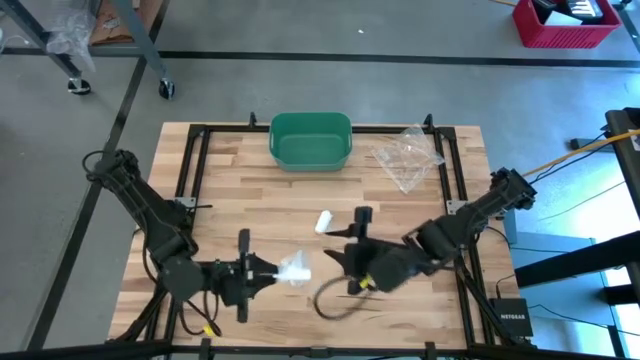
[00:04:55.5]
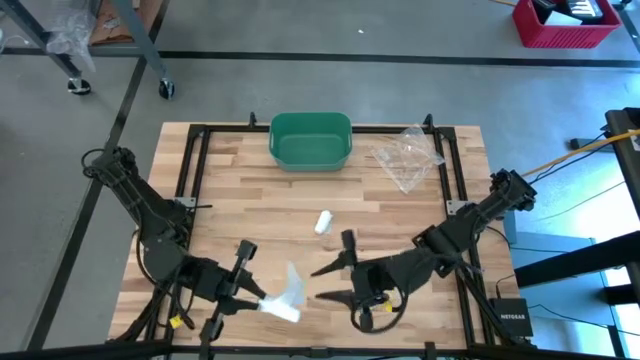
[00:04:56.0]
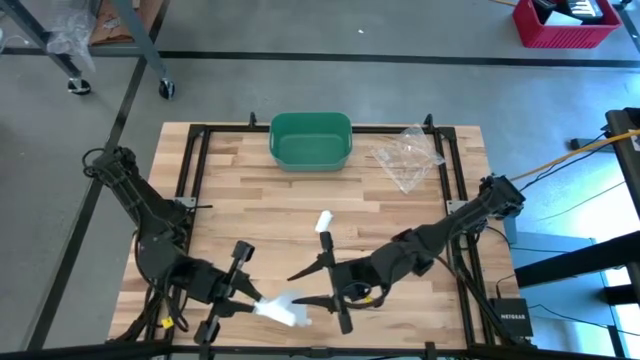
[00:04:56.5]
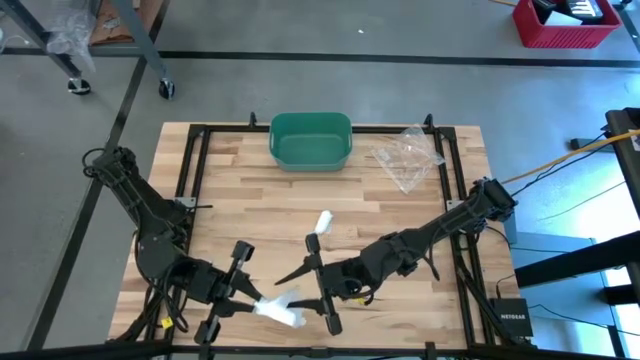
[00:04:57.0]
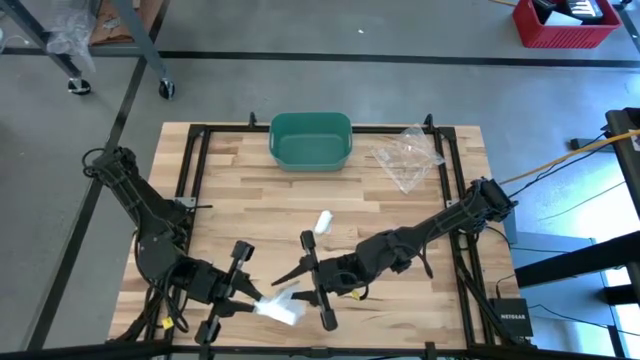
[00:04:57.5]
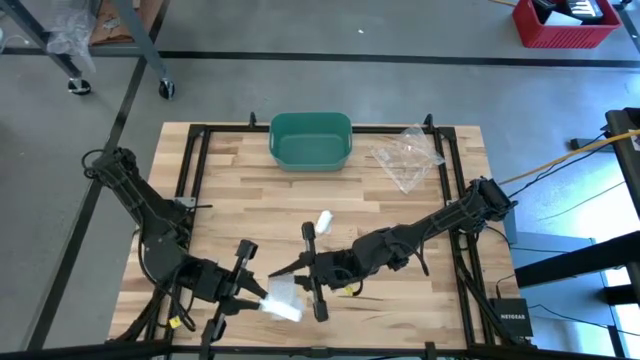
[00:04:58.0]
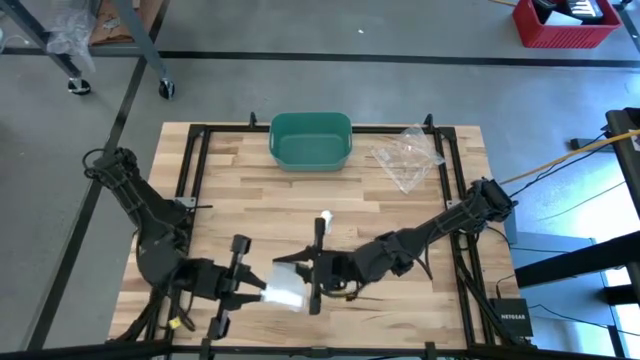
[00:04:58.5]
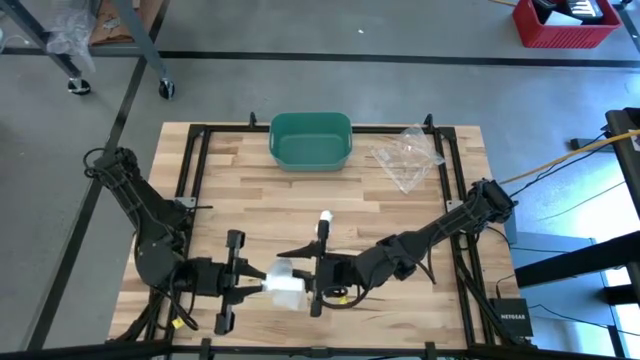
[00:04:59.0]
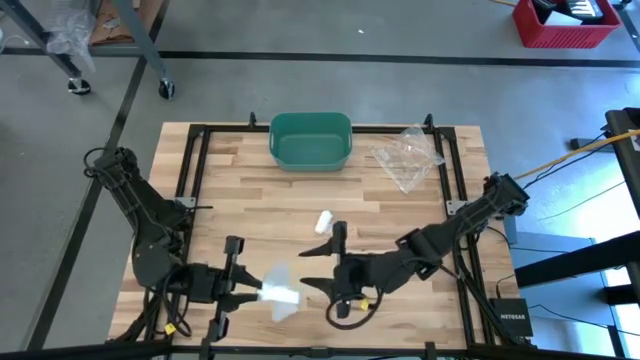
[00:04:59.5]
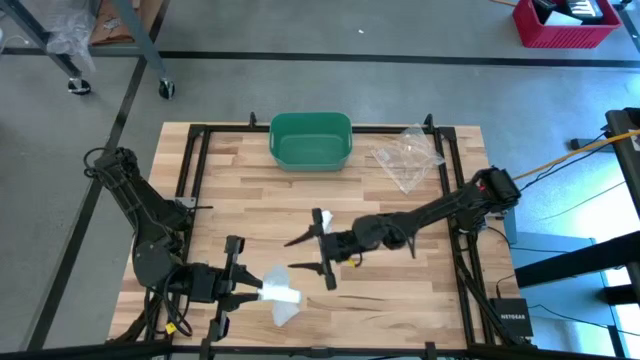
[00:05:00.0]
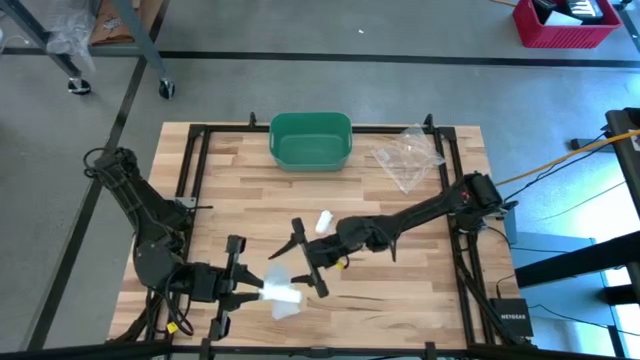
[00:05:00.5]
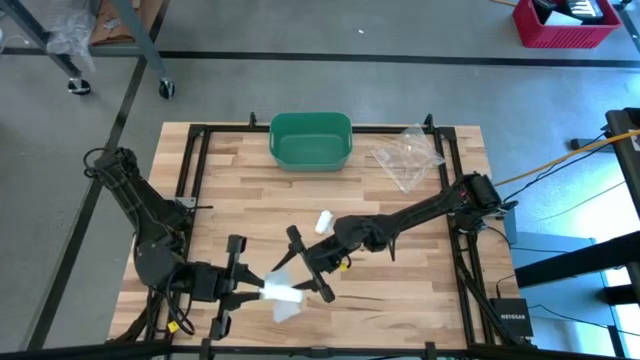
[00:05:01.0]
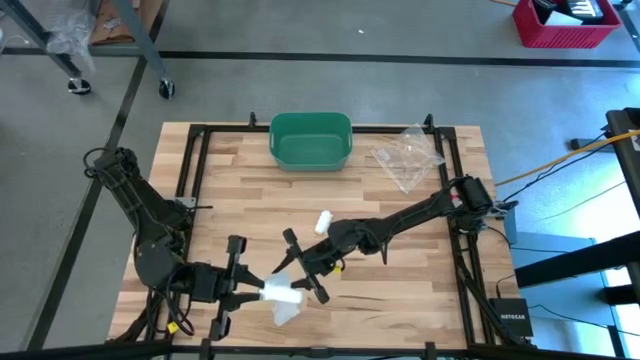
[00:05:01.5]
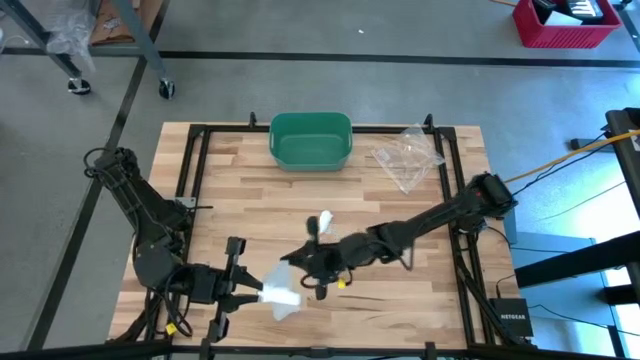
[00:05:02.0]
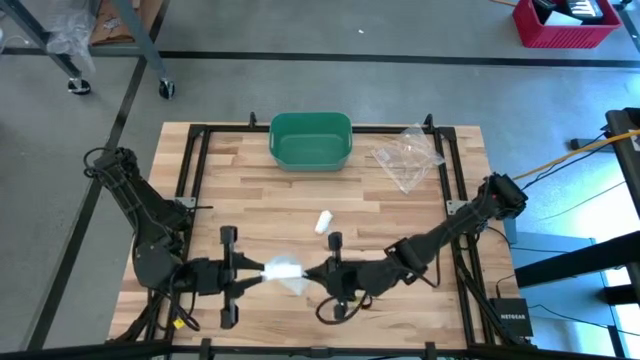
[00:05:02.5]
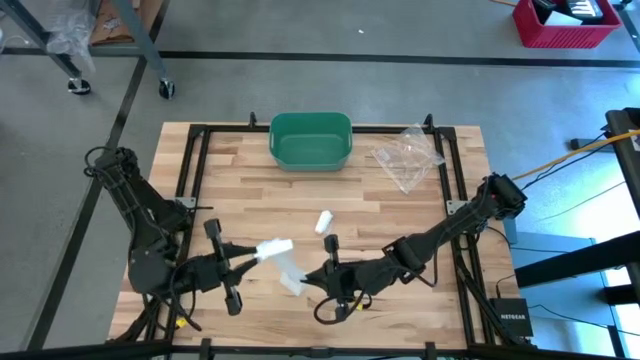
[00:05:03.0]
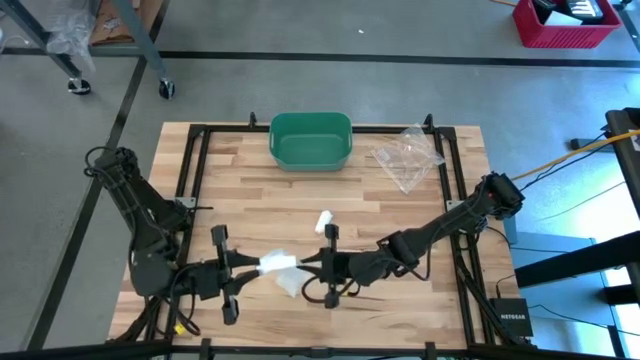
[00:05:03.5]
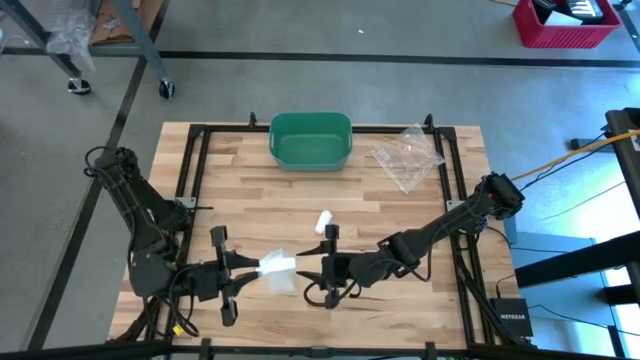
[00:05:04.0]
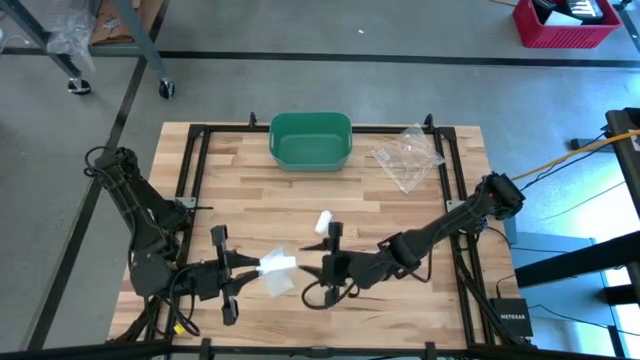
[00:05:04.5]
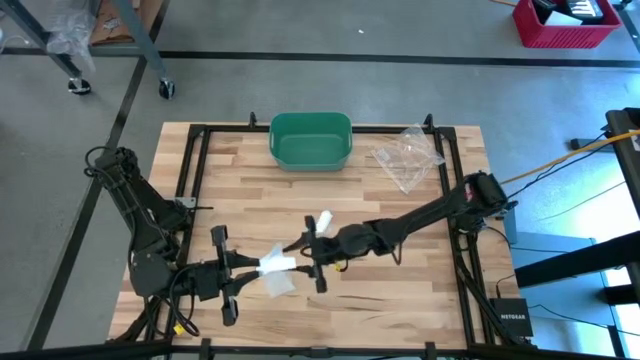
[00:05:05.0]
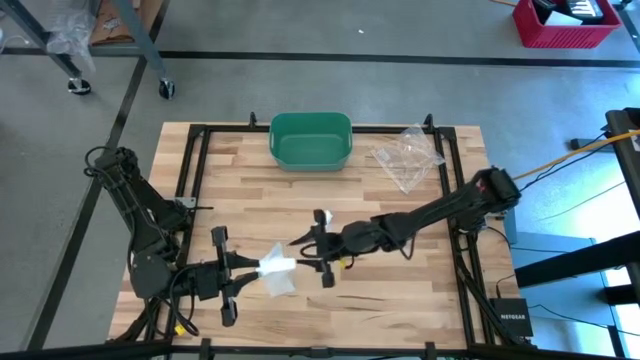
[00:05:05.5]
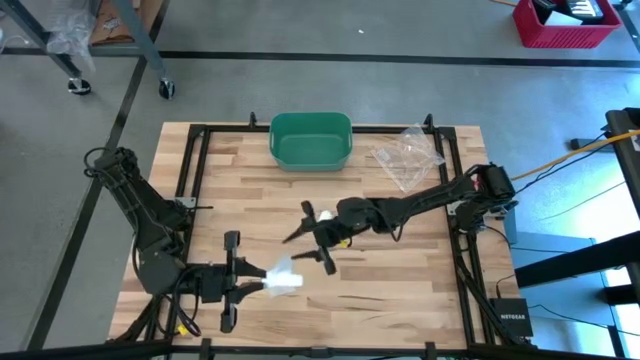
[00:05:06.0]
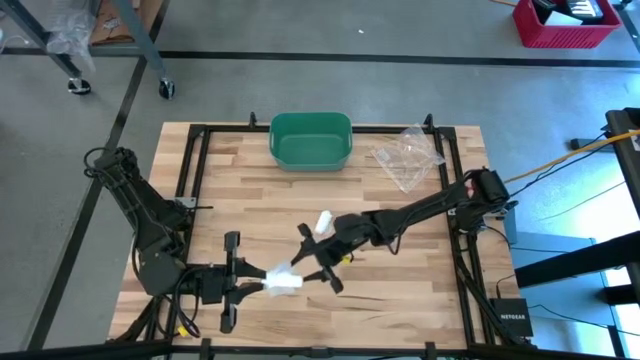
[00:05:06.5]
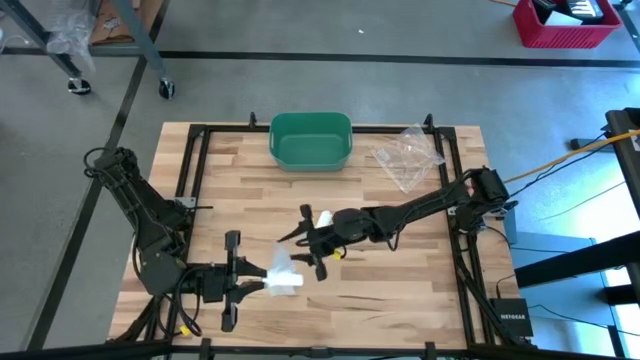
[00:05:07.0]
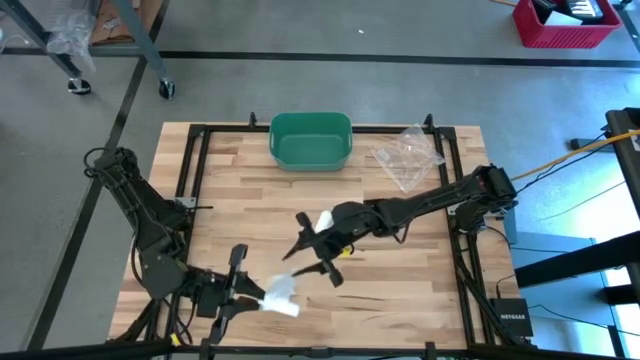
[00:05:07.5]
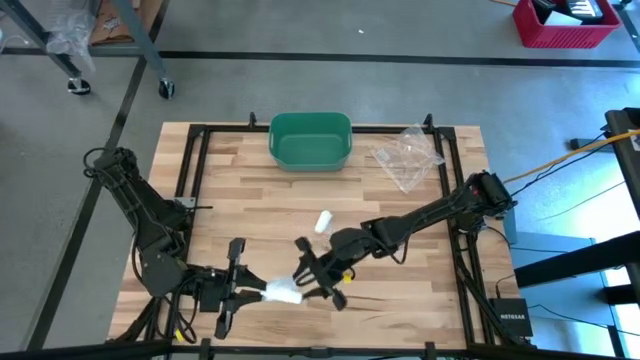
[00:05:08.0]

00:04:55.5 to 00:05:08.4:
Task: Roll bandage
Roll the bottom white bandage

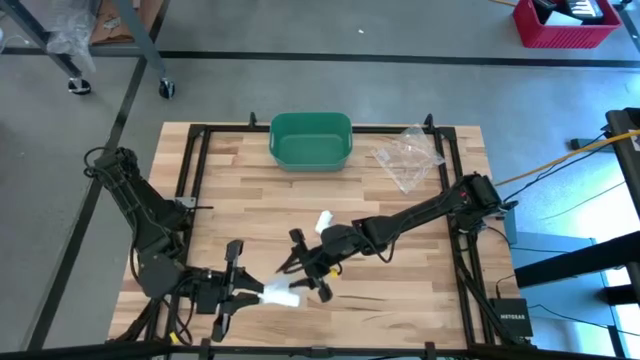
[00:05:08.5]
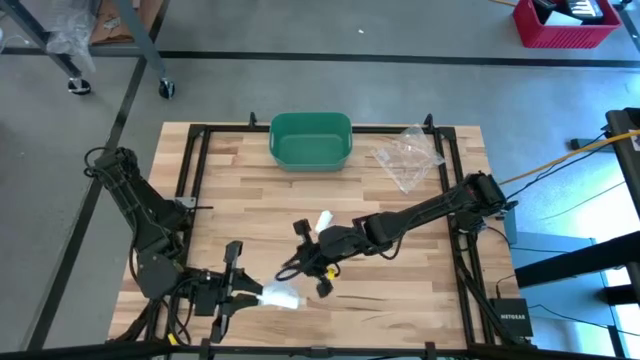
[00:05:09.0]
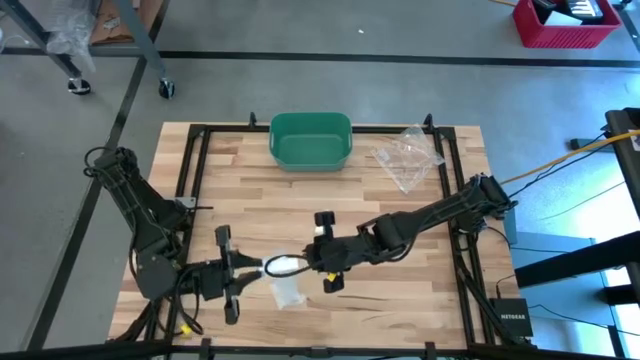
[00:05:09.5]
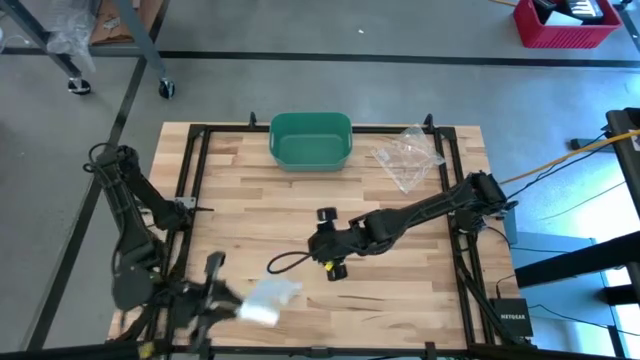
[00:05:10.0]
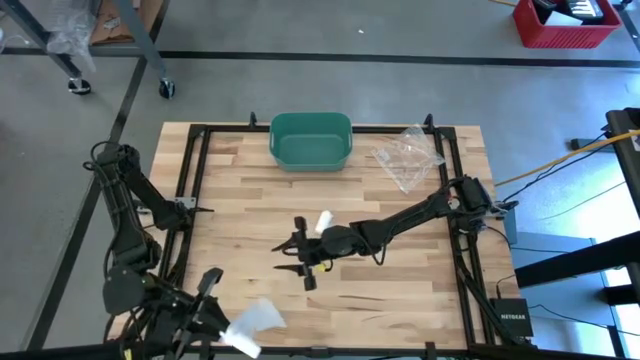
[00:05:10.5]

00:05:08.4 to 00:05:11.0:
Roll the bottom white bandage

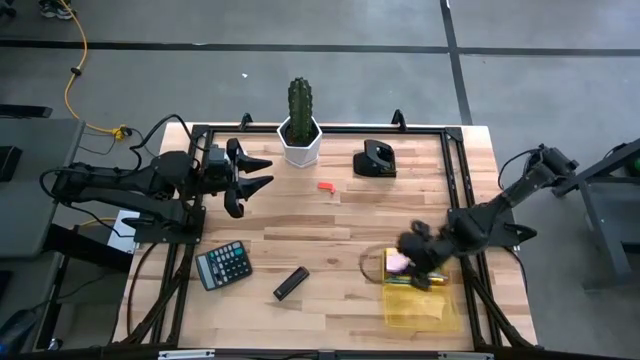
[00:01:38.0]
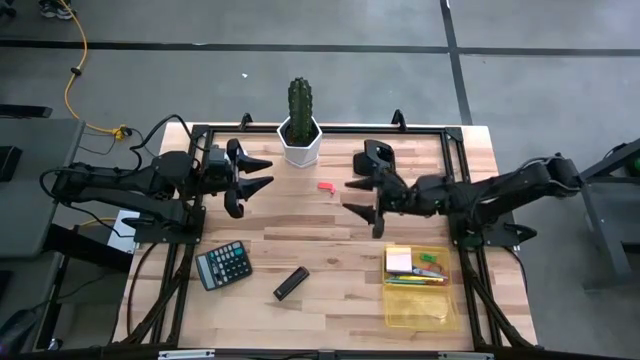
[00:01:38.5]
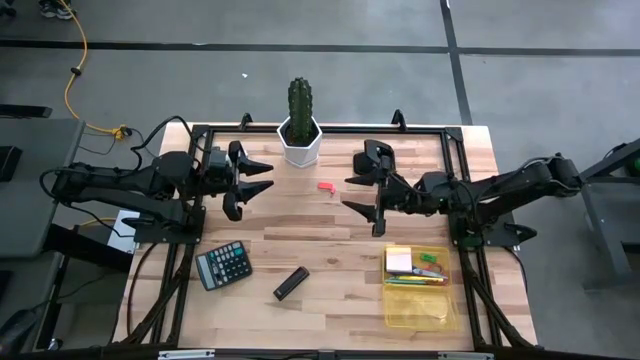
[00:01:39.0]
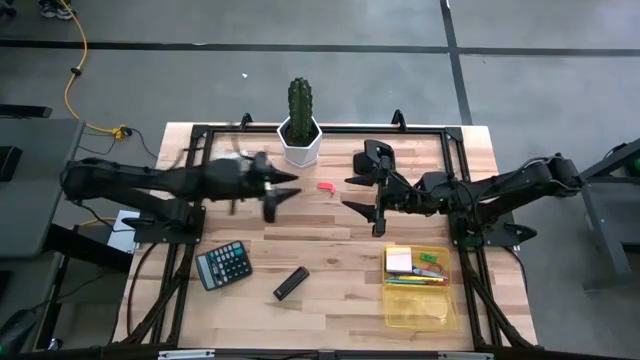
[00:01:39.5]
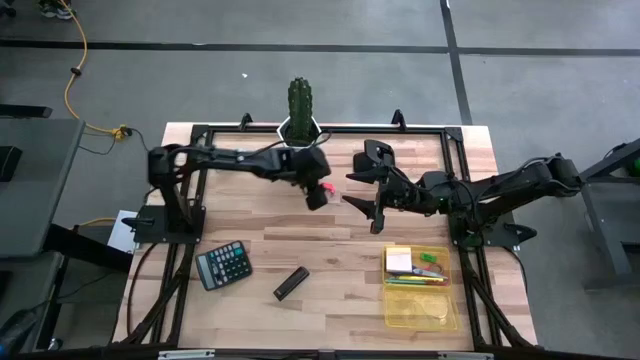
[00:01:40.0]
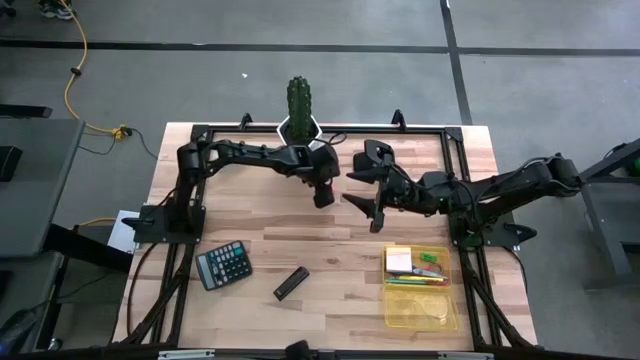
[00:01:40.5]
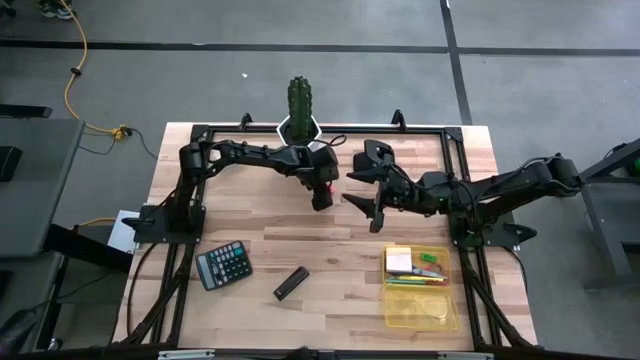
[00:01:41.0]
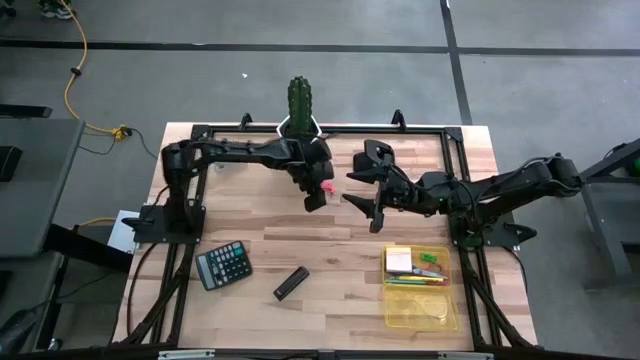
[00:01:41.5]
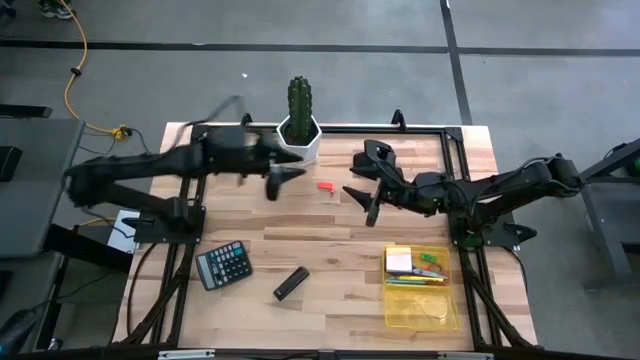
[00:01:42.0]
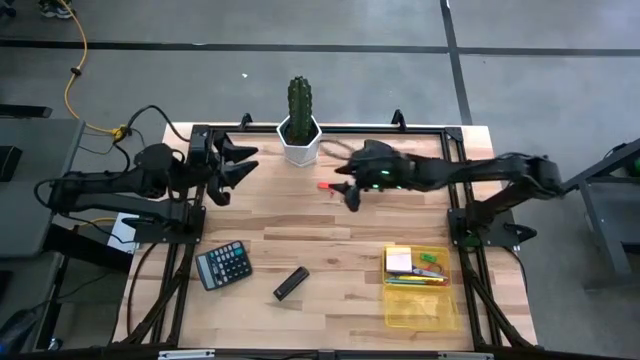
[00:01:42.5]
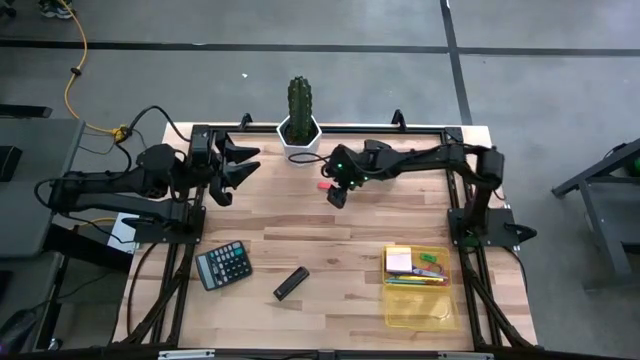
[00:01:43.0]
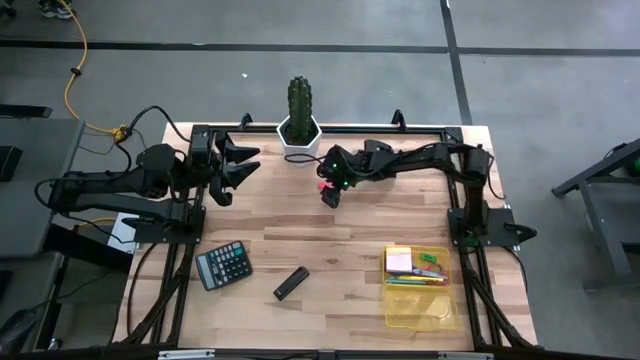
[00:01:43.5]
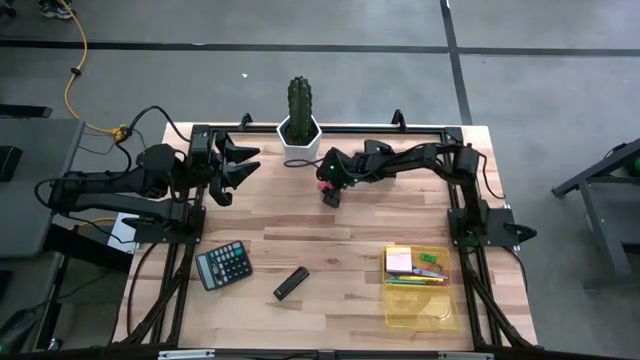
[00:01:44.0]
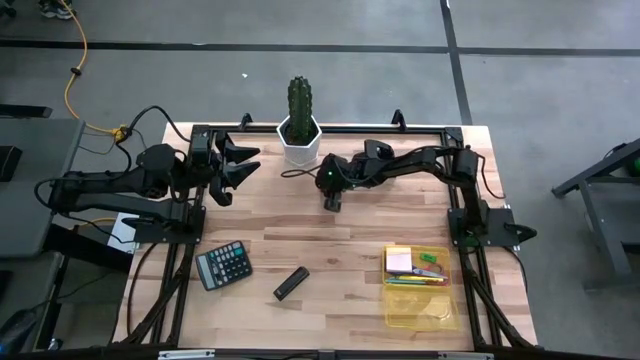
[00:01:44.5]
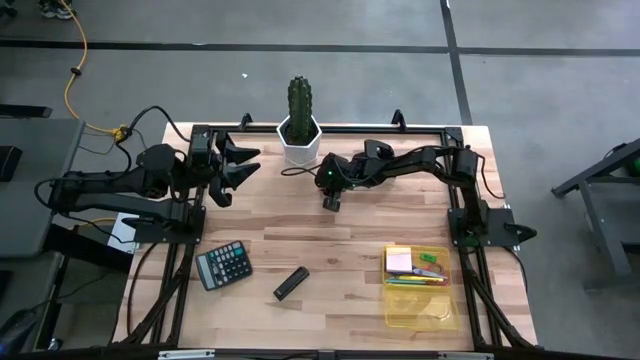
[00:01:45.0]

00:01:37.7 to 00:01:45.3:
Task: Pack school essentials
Put the large orange eraser on the yellow supply box
